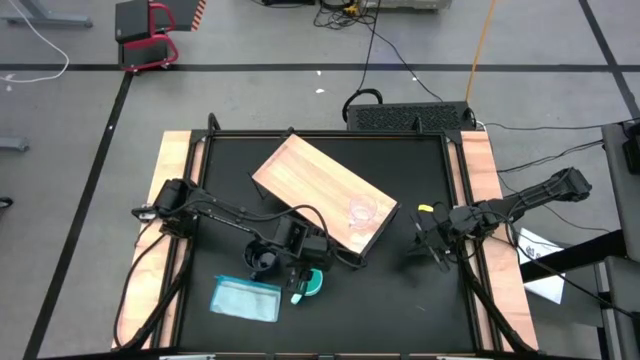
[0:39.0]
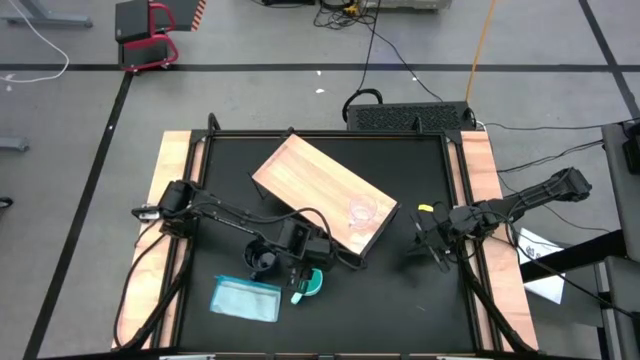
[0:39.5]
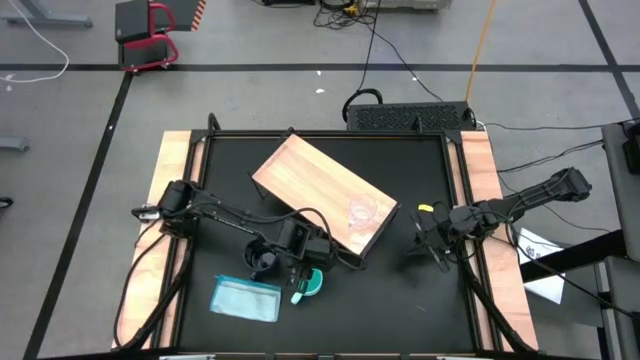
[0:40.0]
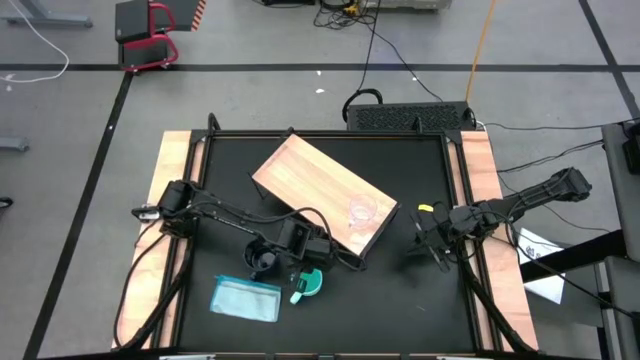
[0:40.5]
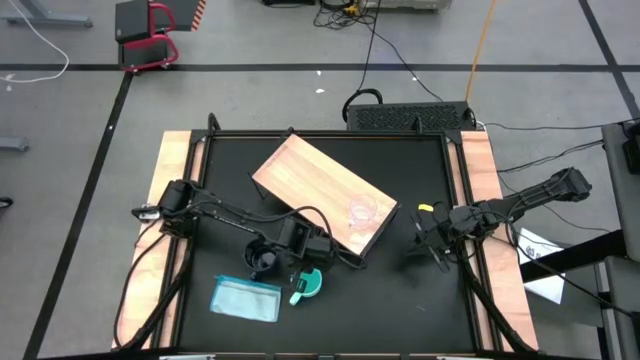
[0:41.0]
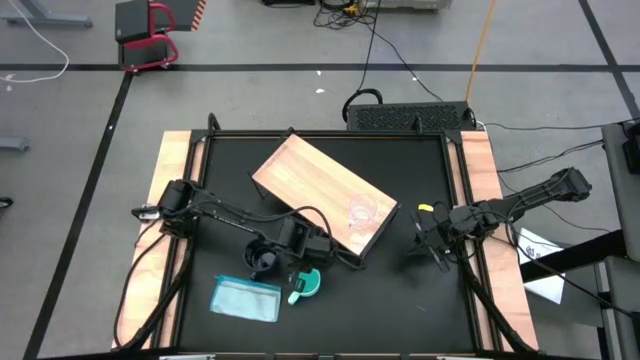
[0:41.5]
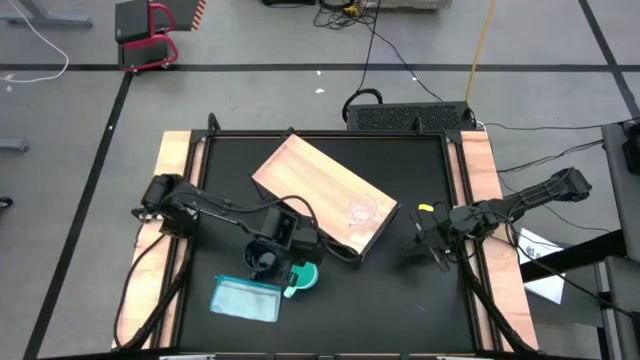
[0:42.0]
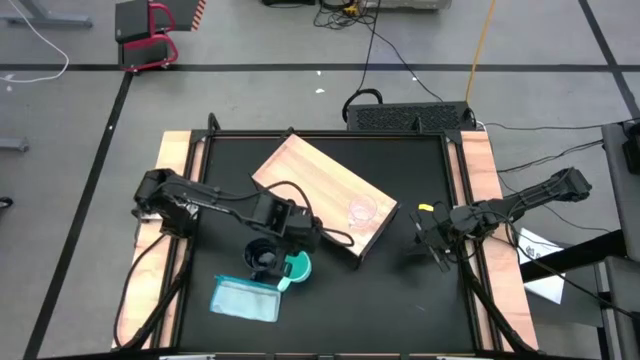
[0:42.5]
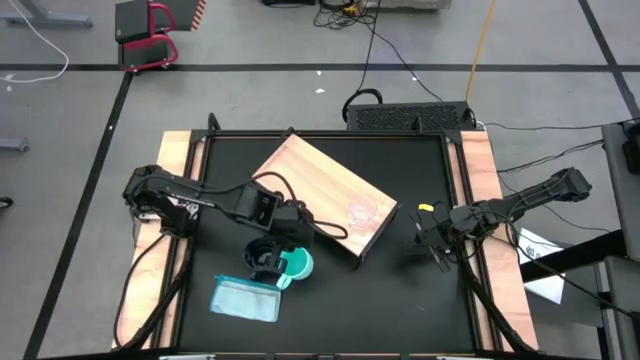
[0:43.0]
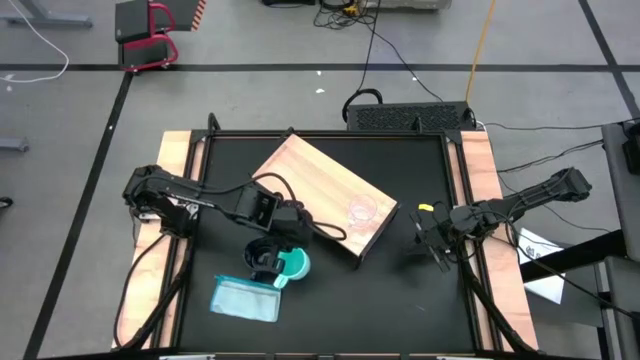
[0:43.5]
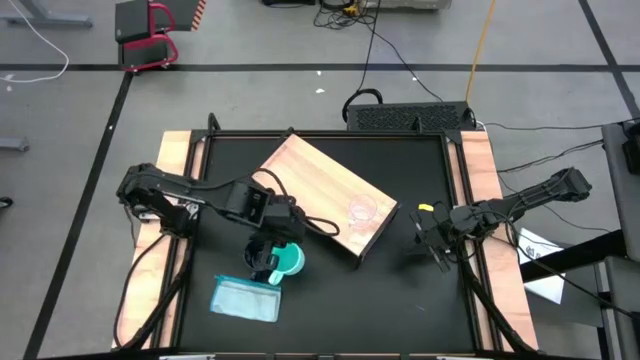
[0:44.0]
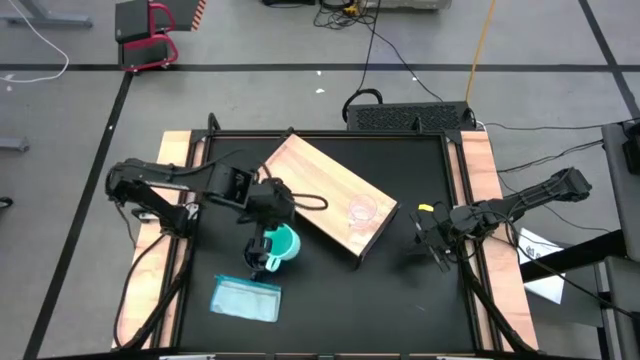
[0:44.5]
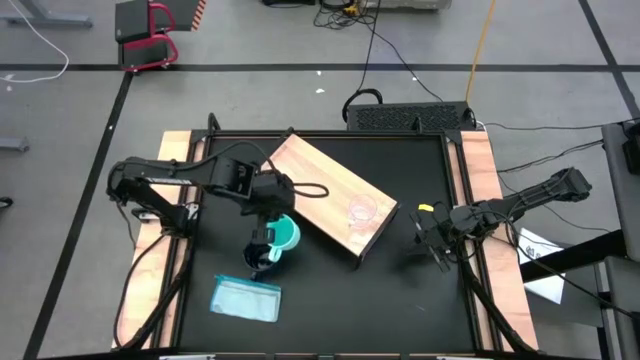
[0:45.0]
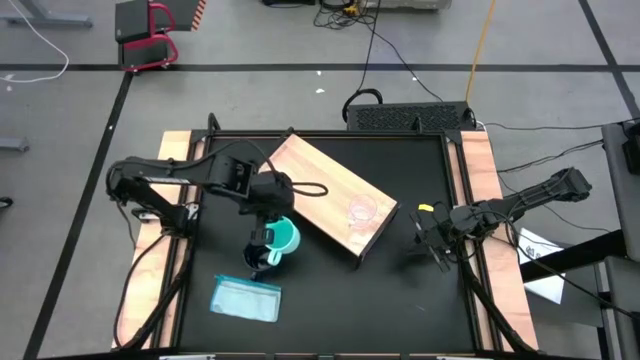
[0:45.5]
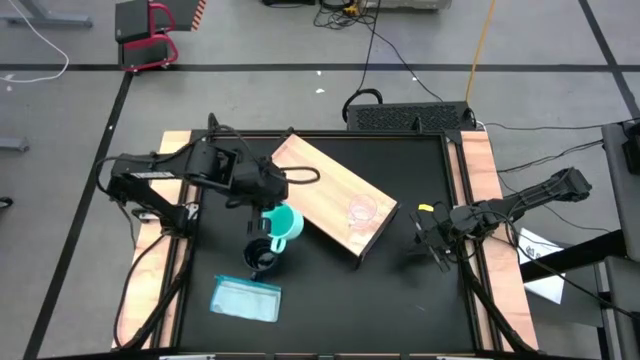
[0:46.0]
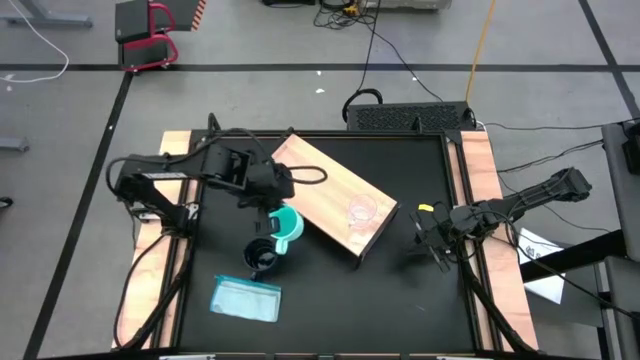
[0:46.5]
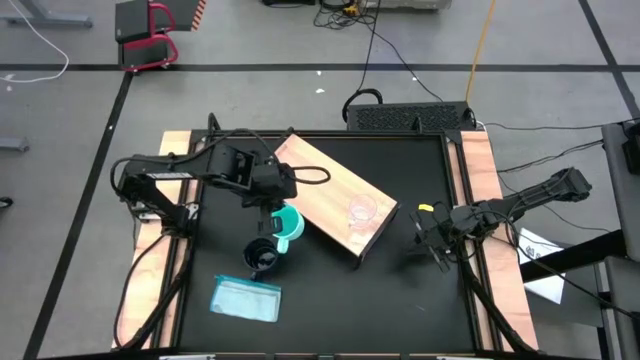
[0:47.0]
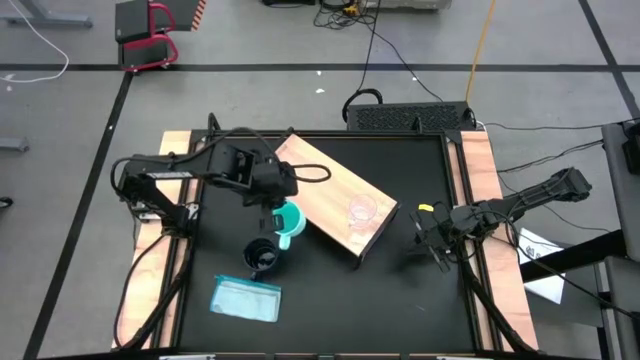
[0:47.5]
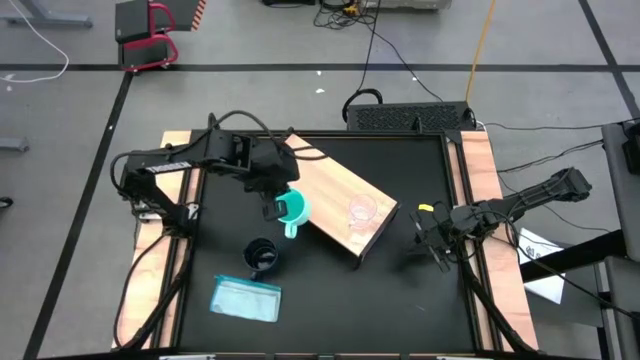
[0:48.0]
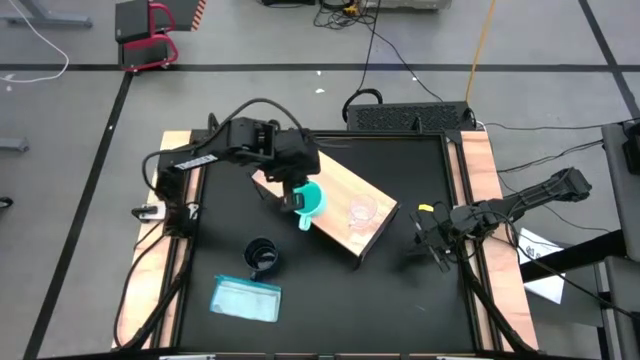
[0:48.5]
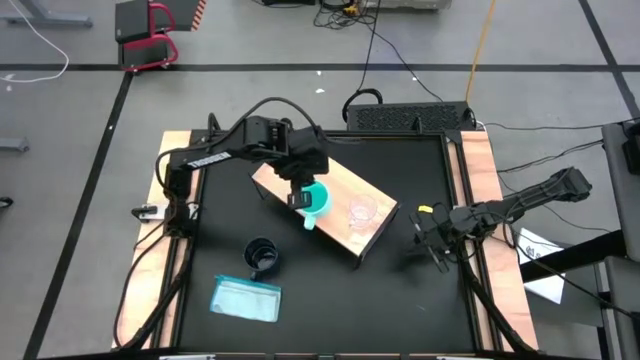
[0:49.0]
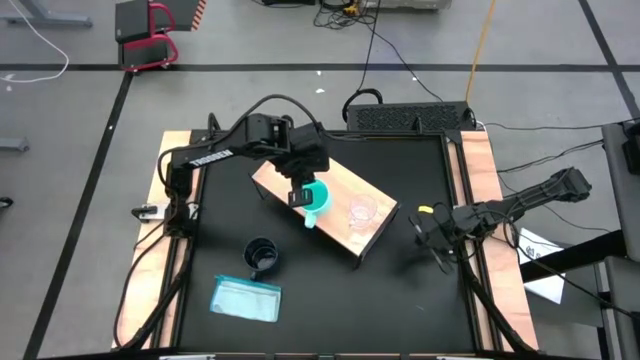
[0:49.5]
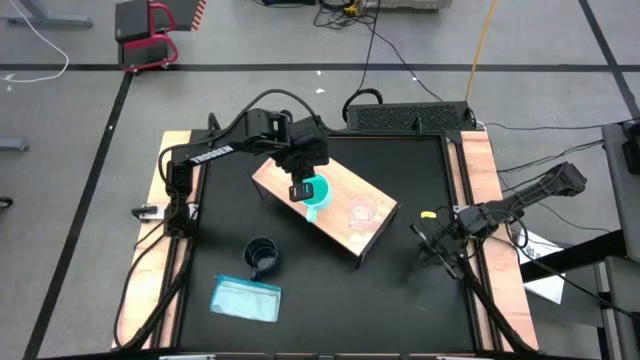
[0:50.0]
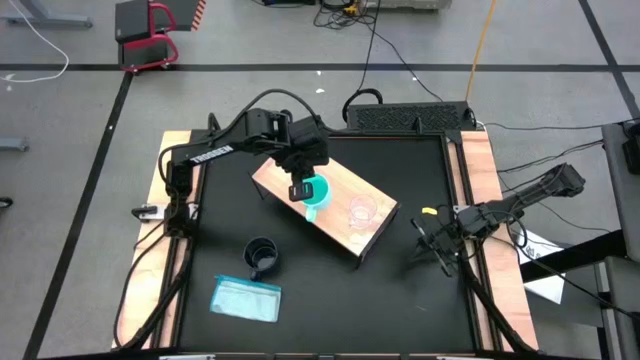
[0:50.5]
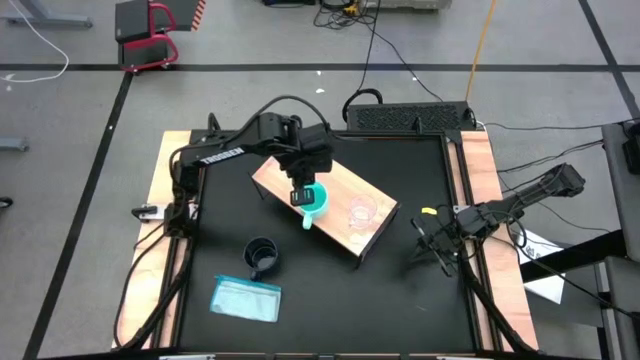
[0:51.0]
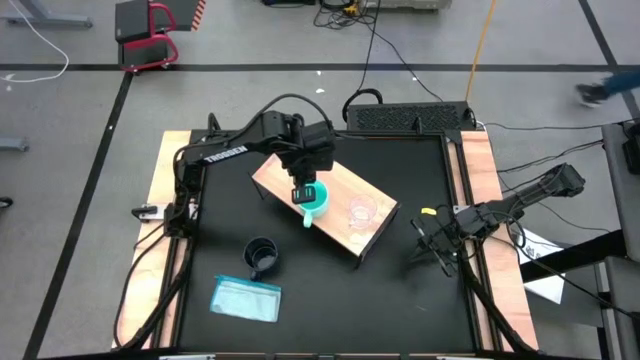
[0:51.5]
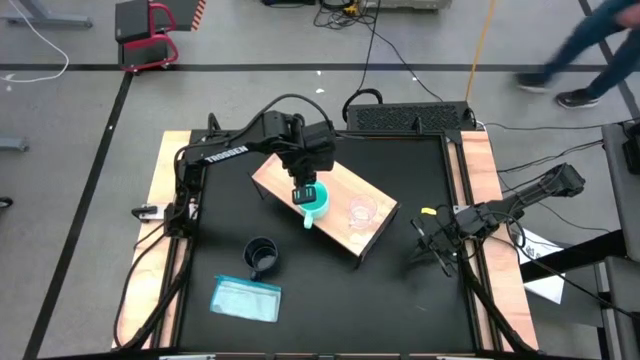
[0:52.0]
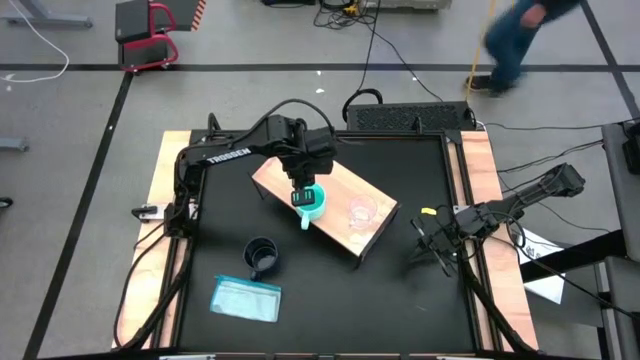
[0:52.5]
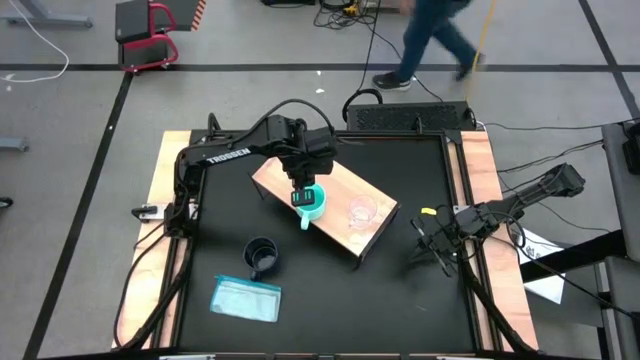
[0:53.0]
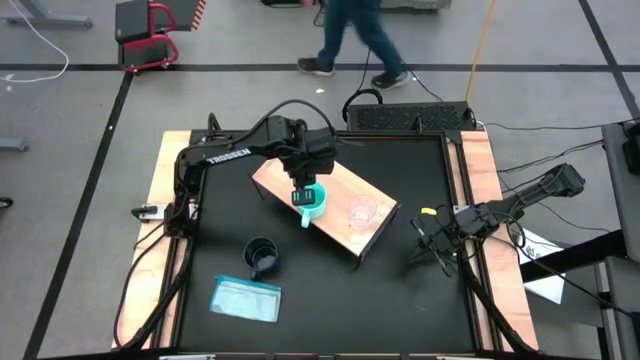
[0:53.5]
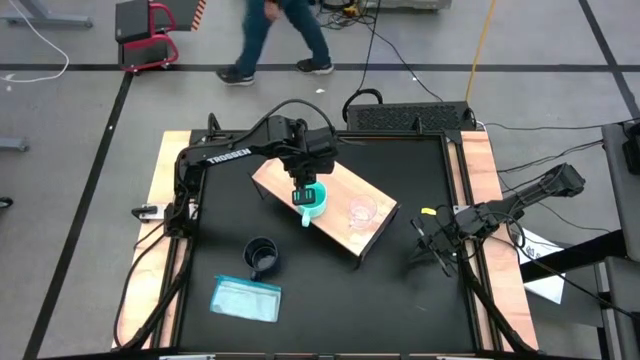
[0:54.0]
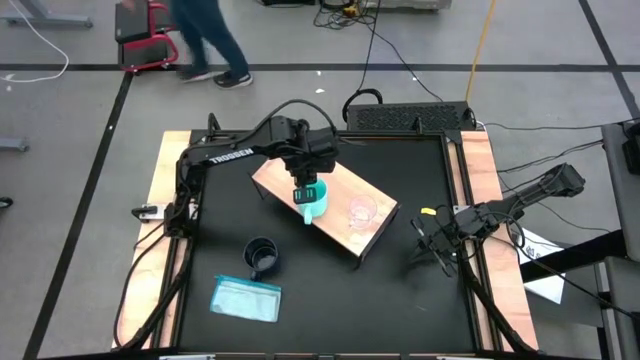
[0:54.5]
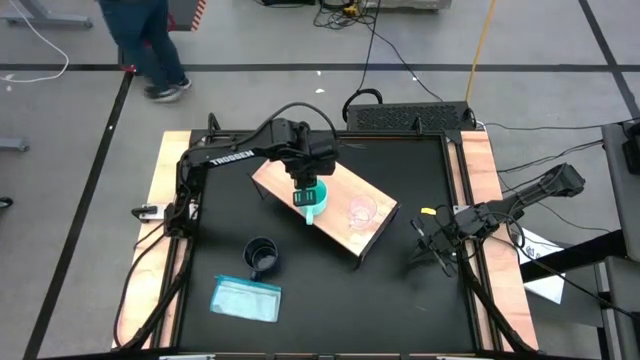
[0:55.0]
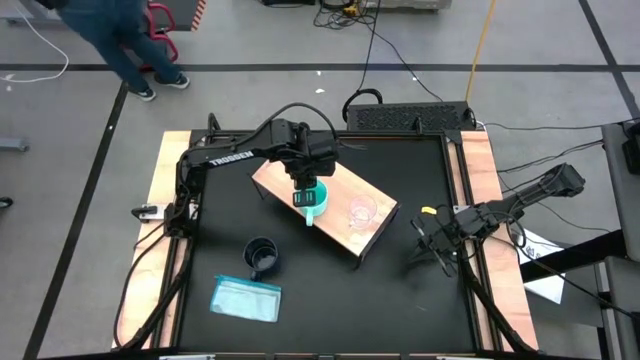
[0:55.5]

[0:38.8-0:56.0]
Task: Stack small to large cups/mugs on shelf
Put the light blue mug on the shelf

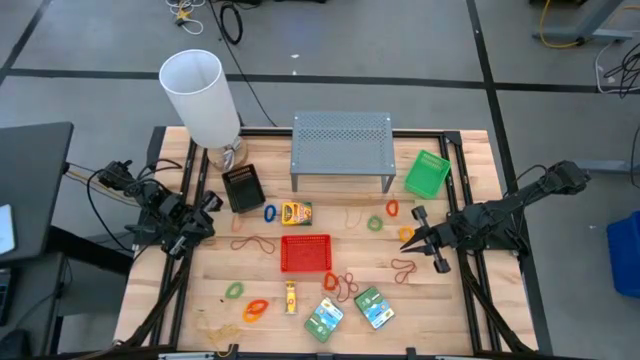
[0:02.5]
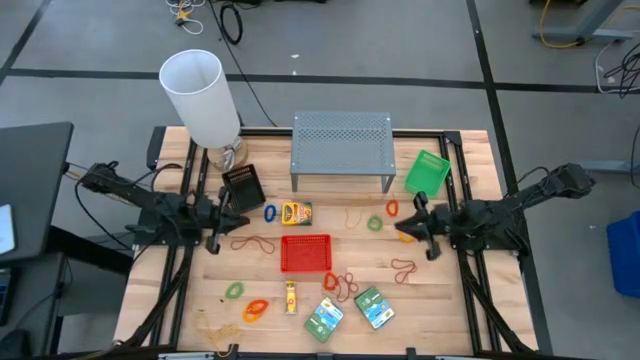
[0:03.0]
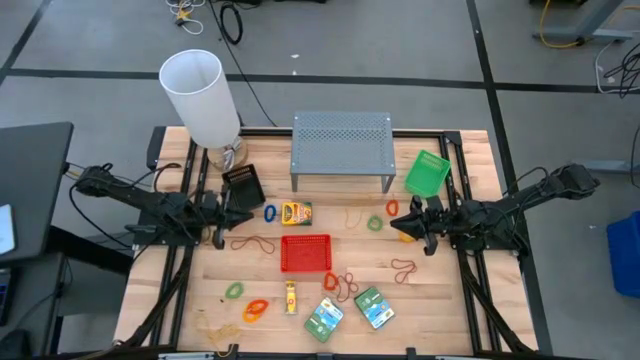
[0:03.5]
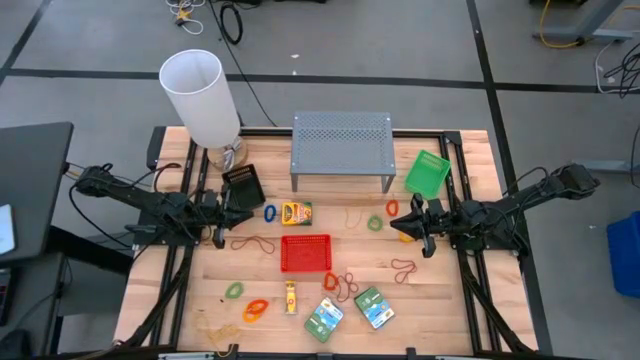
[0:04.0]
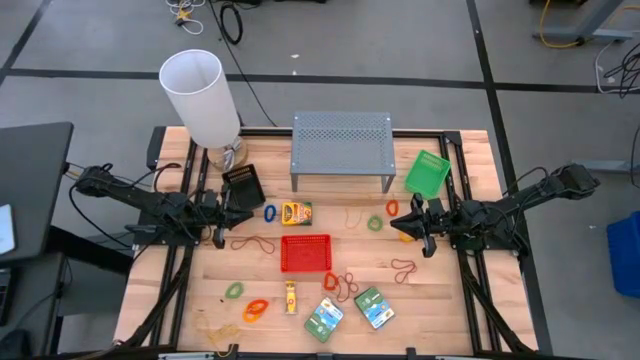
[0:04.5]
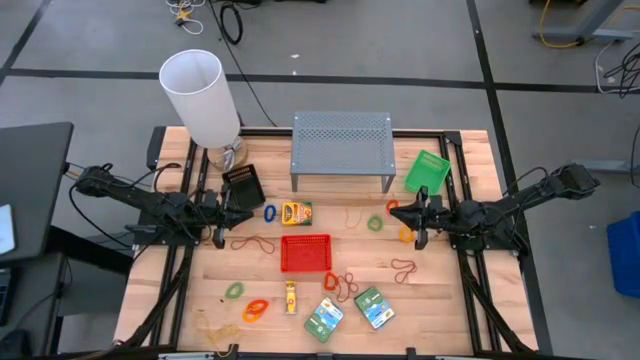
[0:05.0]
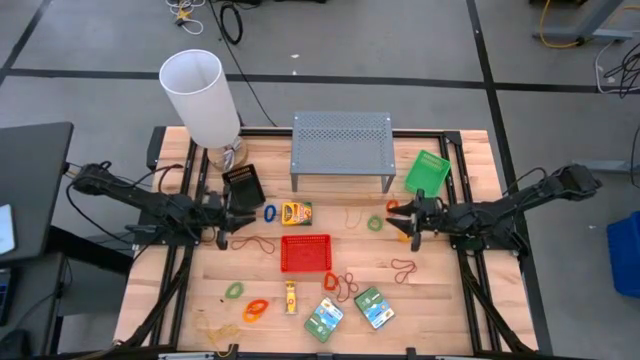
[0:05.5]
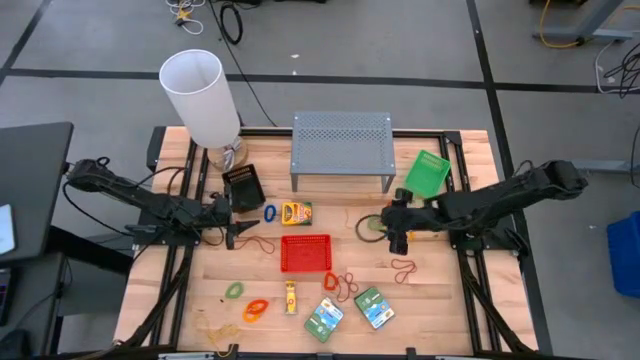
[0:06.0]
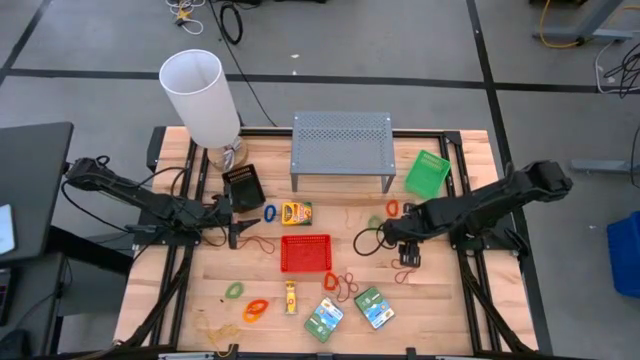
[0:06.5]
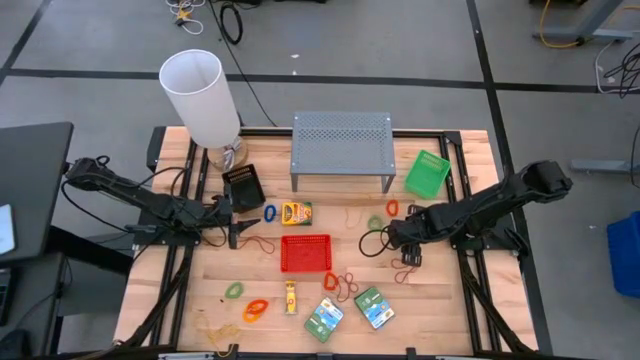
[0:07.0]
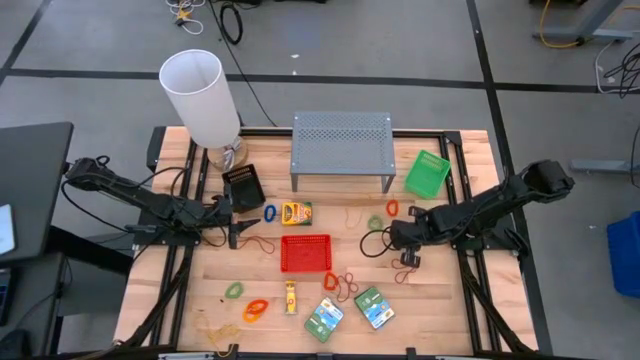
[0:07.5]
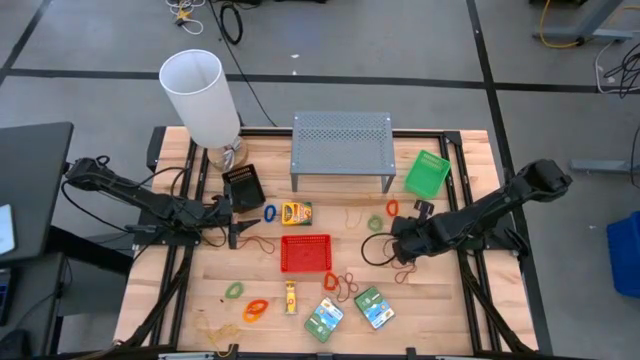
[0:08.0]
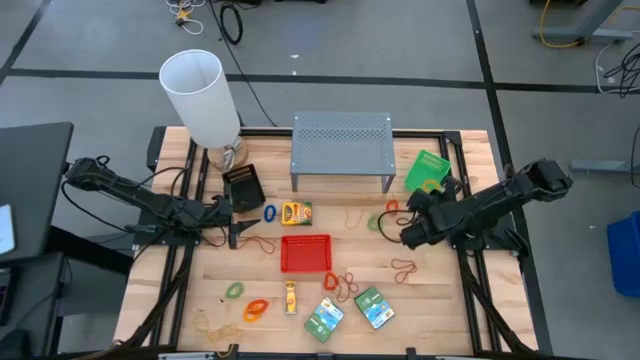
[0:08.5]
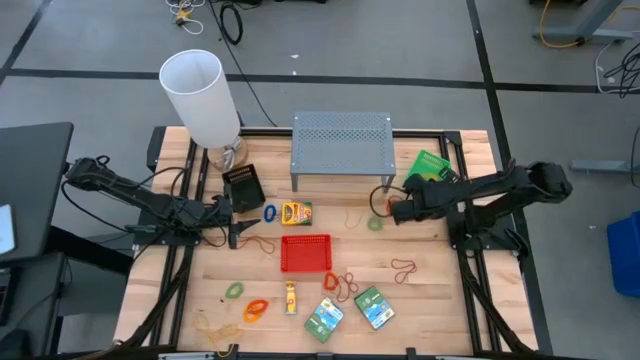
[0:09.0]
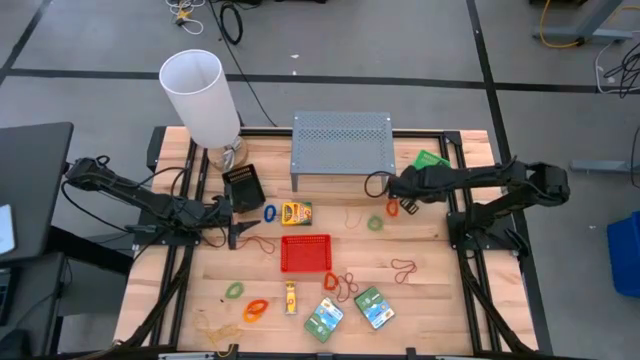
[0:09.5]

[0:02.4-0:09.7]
Task: Pick & Place Office Desk Supplies
Put the yellow spring keychain into the green bin
